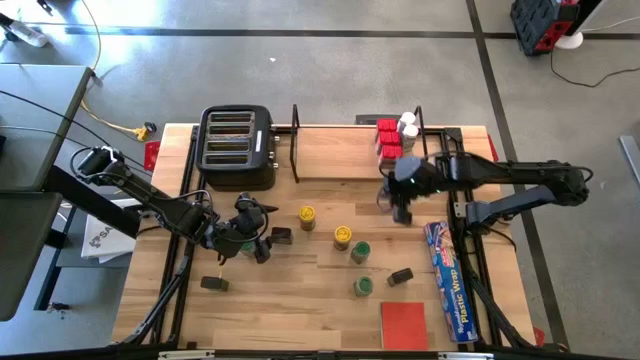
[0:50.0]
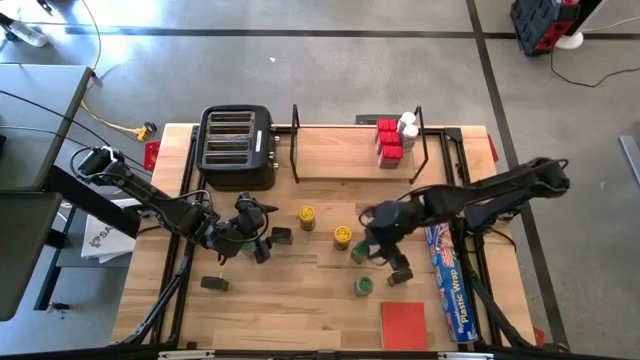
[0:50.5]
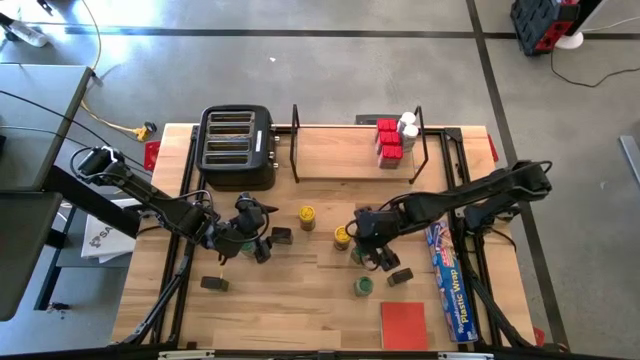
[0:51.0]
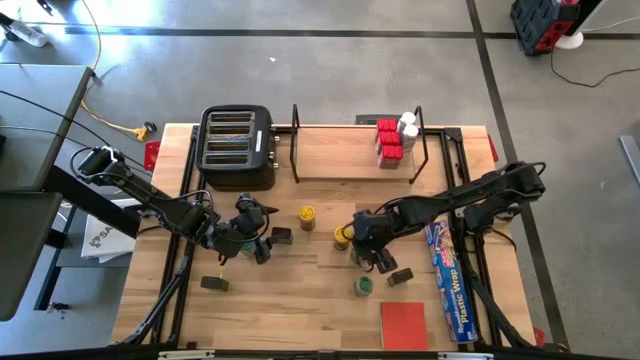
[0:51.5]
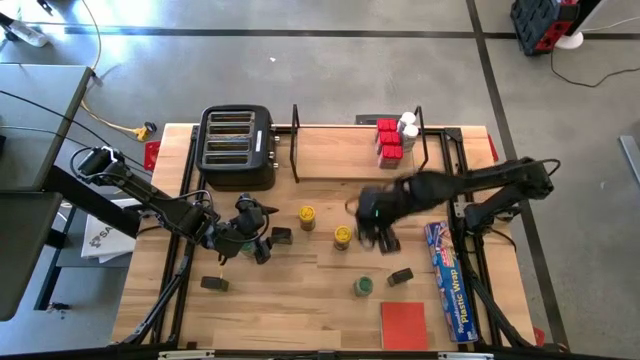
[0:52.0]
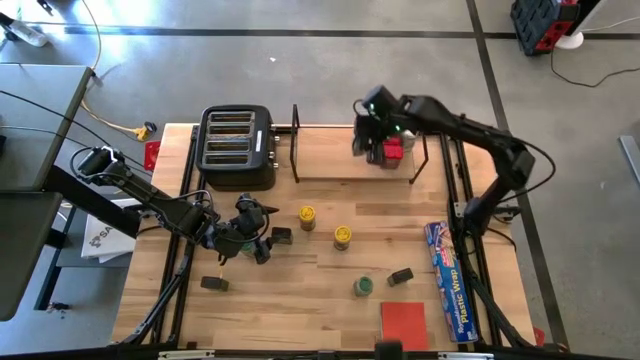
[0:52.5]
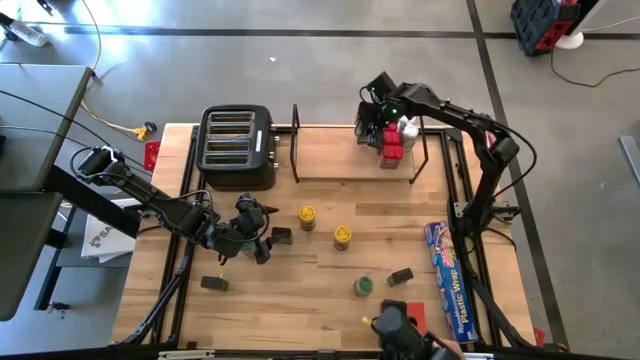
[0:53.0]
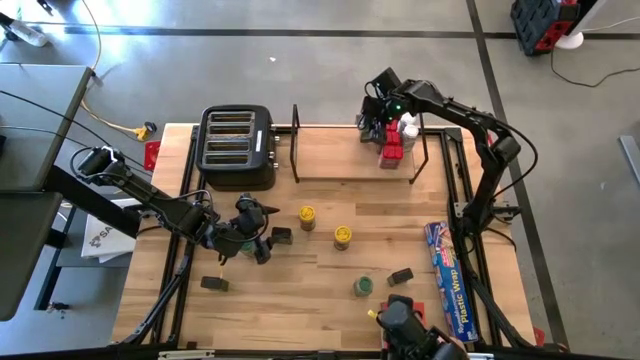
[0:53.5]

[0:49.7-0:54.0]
Task: Shelf spices
Put the top right green seasoning bottle on the shelf

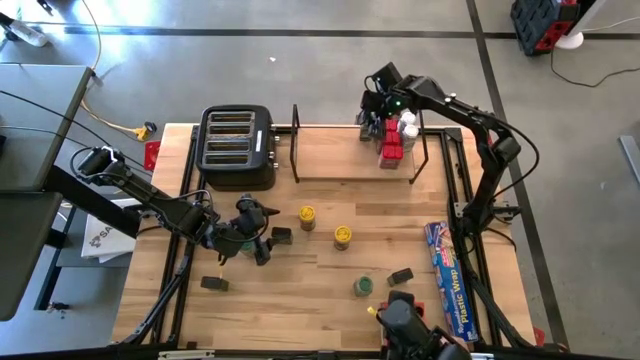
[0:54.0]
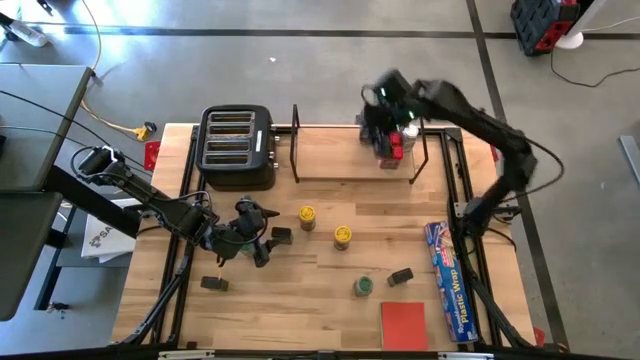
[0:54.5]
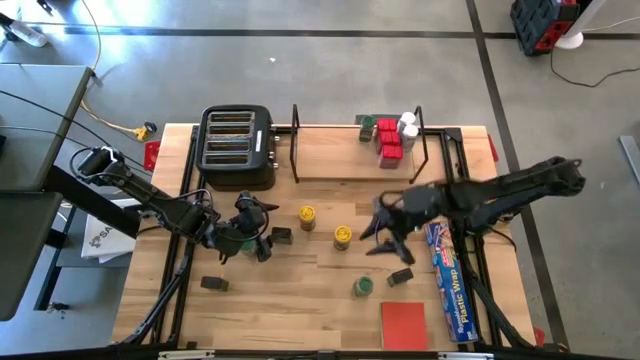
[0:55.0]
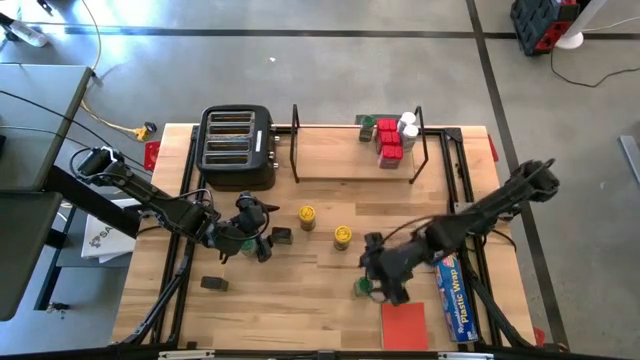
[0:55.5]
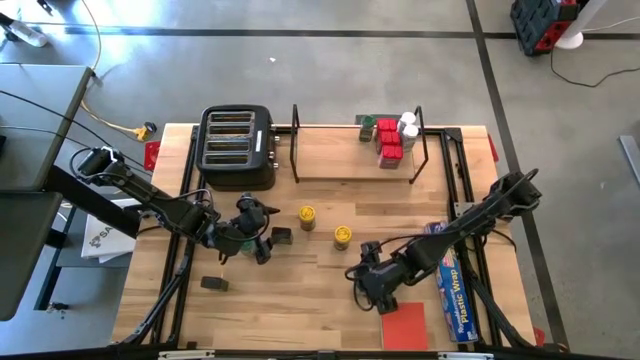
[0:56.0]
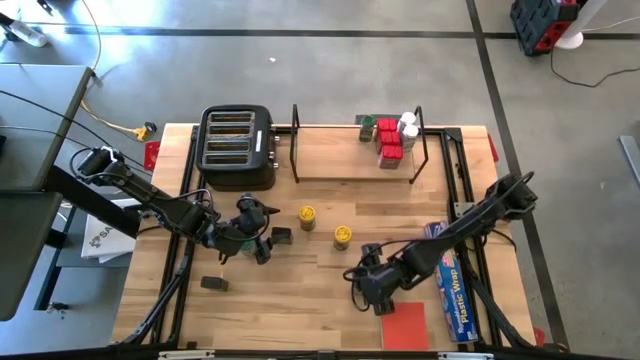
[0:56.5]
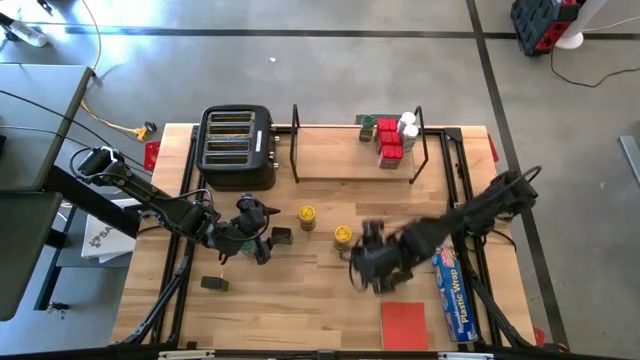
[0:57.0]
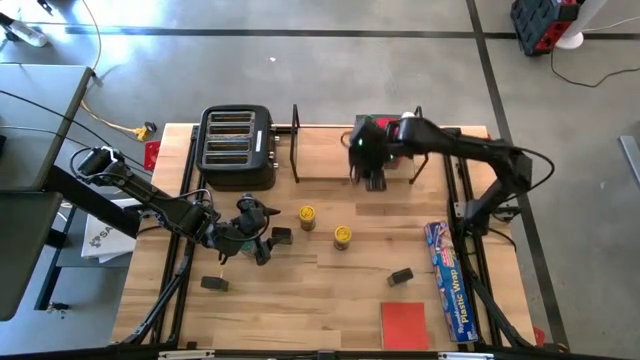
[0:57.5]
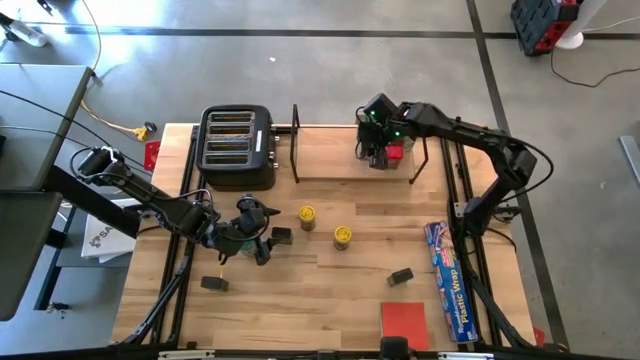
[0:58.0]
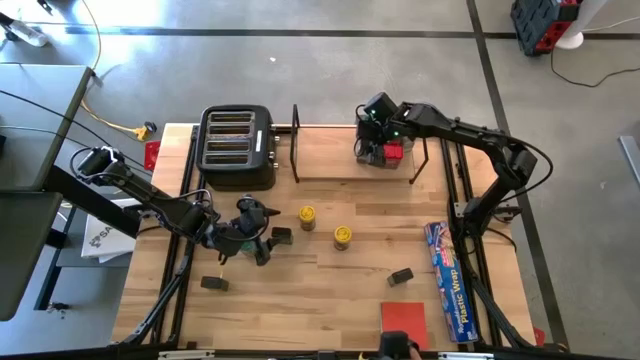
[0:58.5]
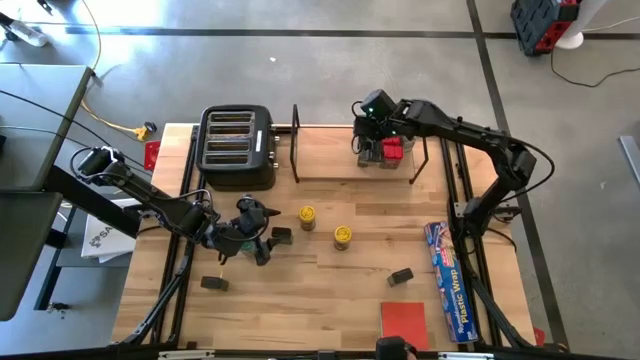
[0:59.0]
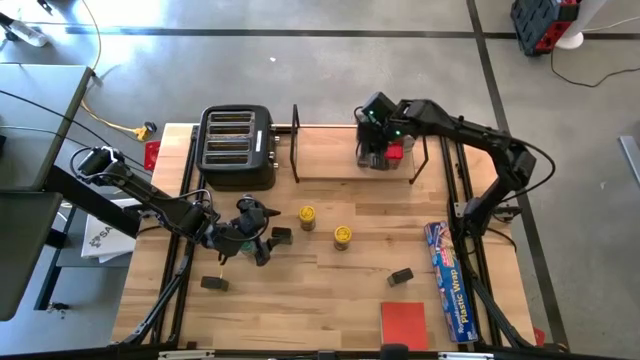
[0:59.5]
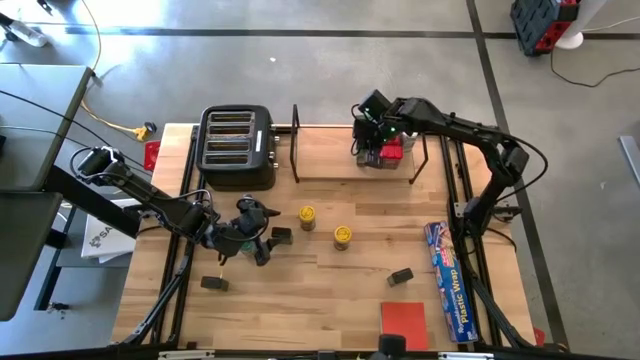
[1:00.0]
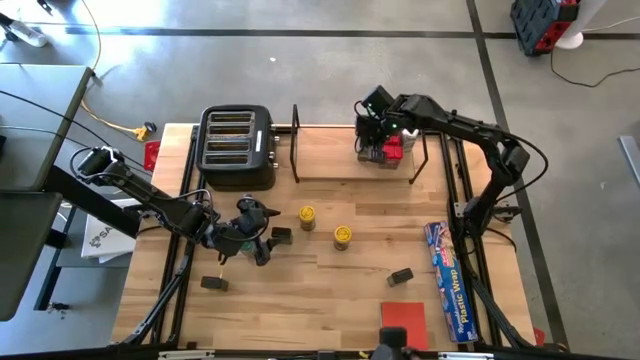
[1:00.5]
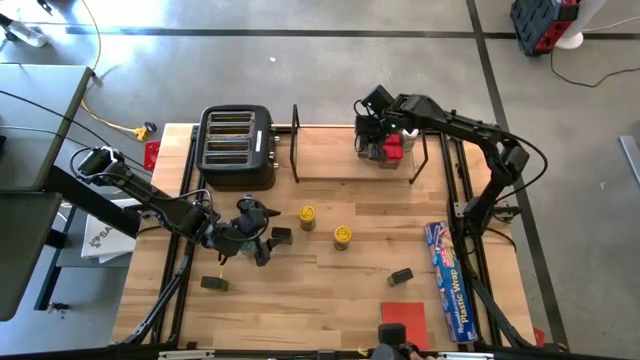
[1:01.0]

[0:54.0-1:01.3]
Put the right green seasoning bottle on the shelf aligned with the other green seasoning bottle

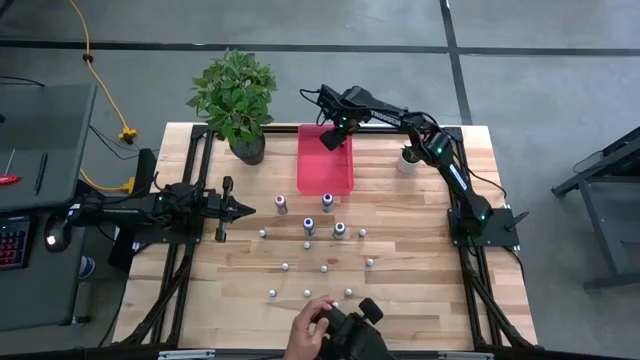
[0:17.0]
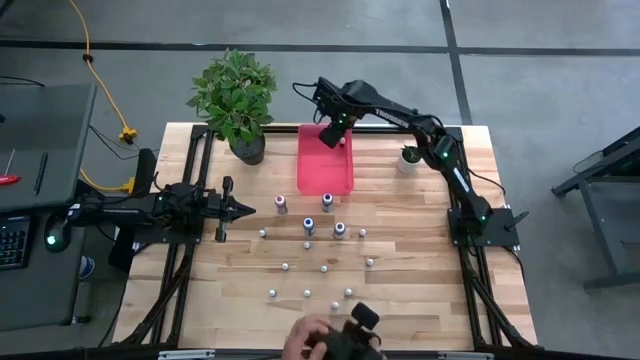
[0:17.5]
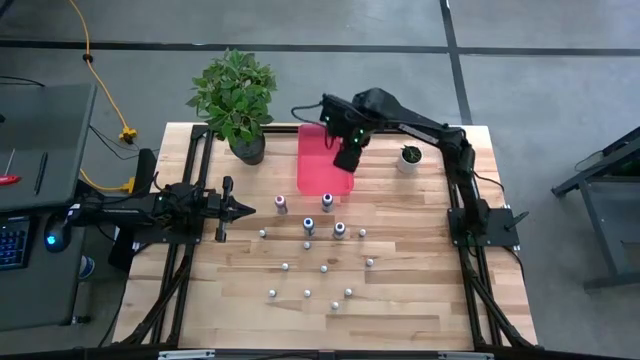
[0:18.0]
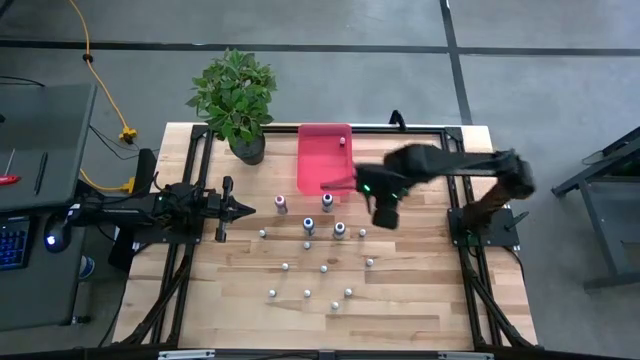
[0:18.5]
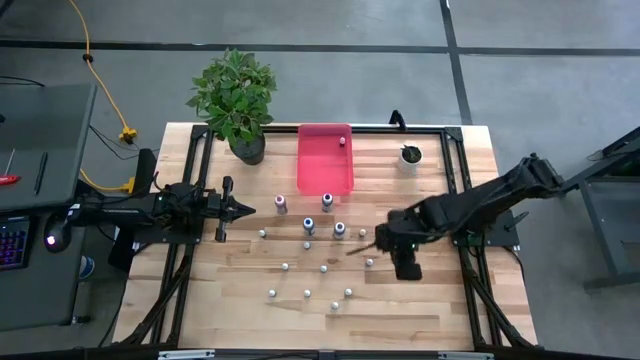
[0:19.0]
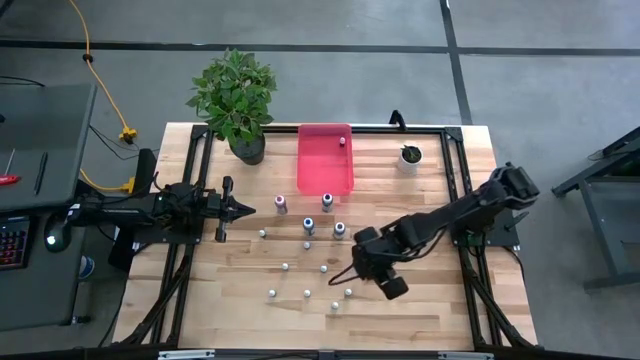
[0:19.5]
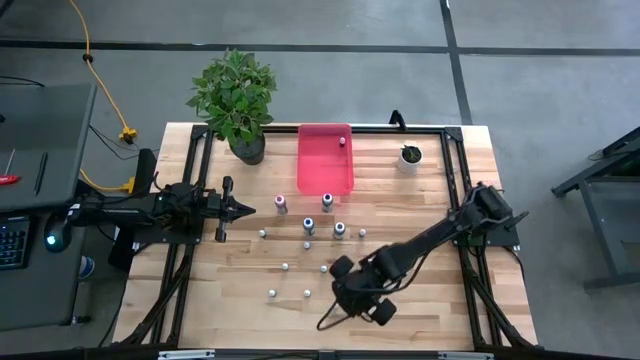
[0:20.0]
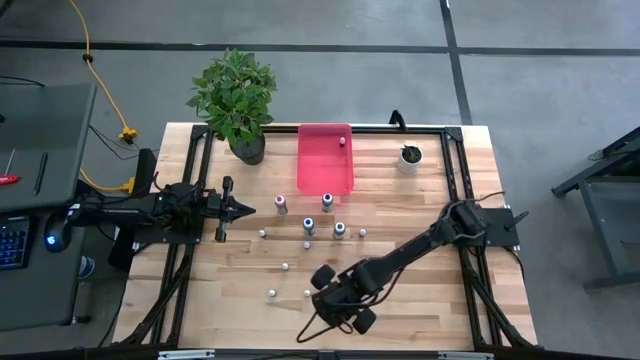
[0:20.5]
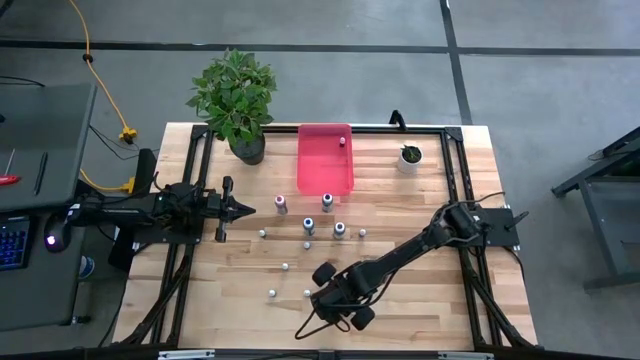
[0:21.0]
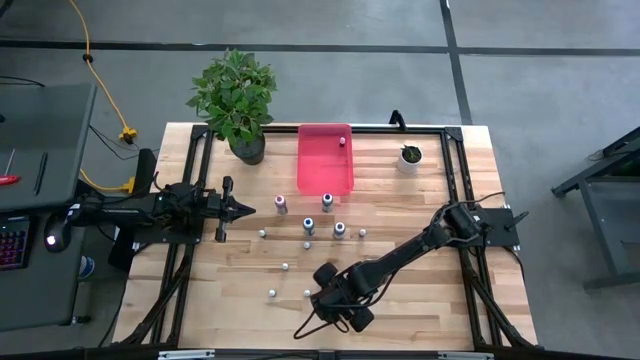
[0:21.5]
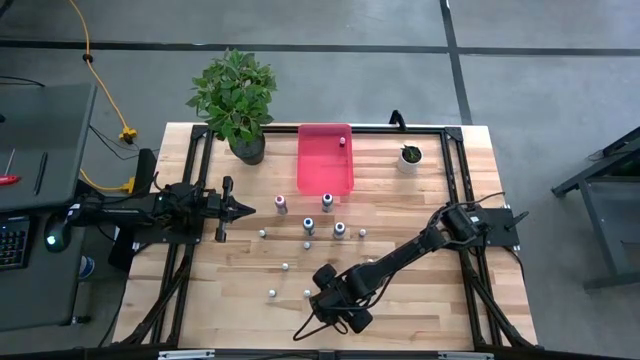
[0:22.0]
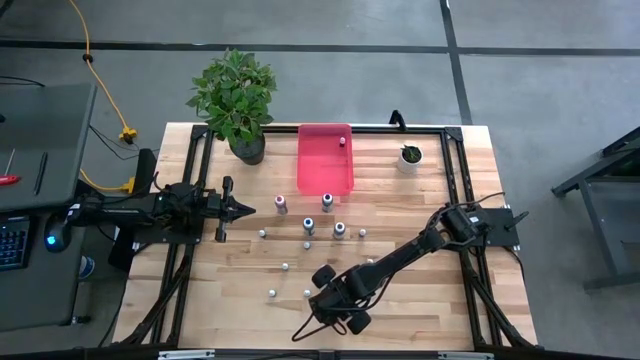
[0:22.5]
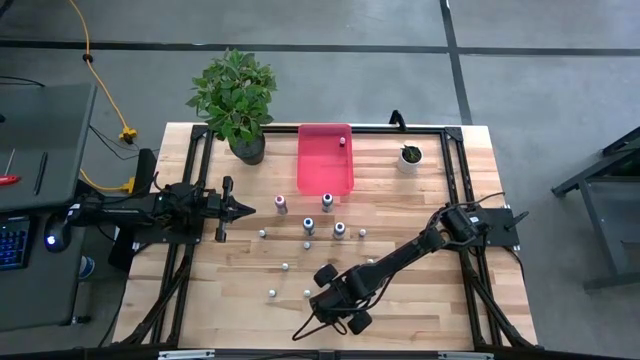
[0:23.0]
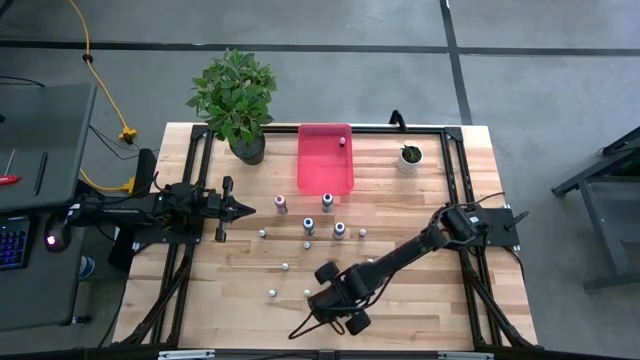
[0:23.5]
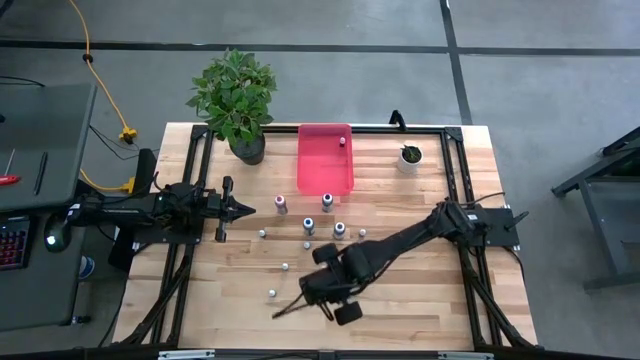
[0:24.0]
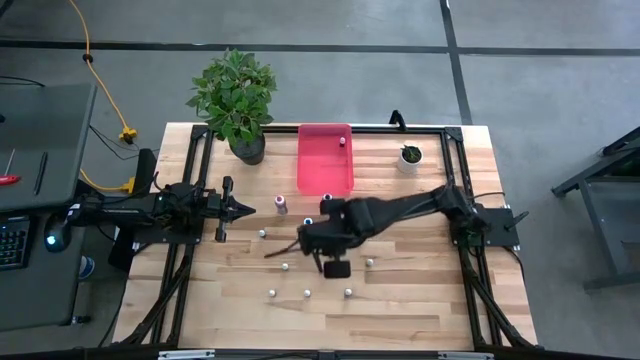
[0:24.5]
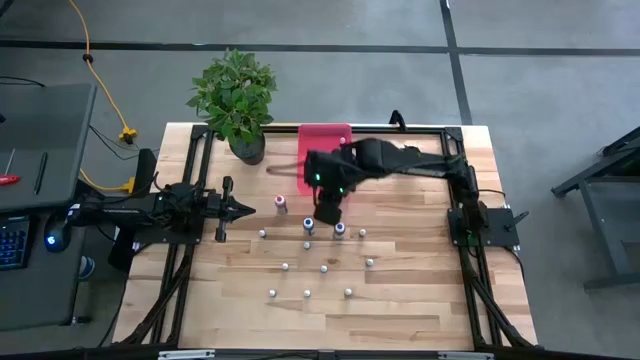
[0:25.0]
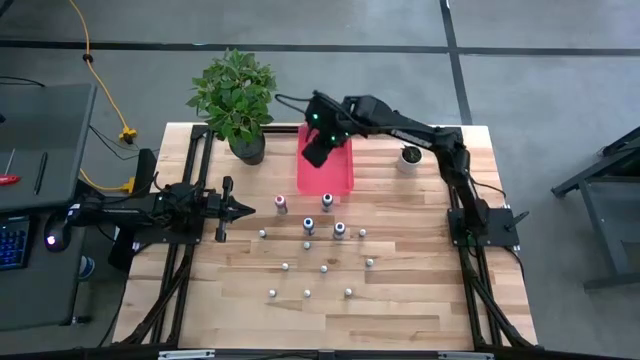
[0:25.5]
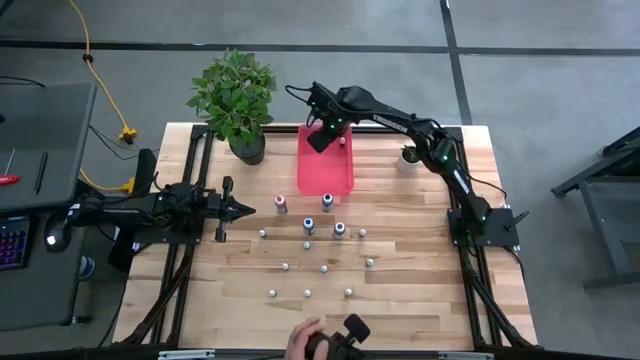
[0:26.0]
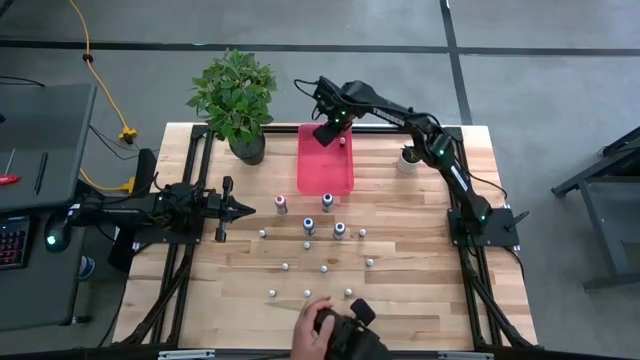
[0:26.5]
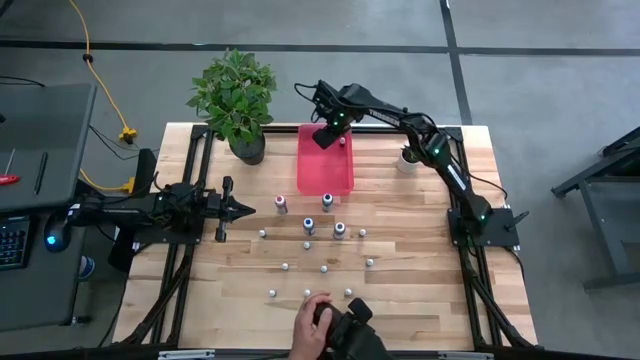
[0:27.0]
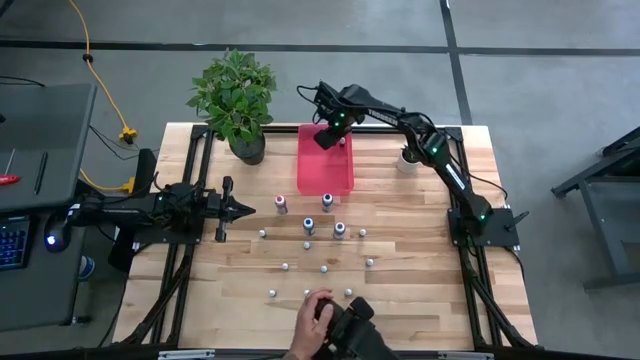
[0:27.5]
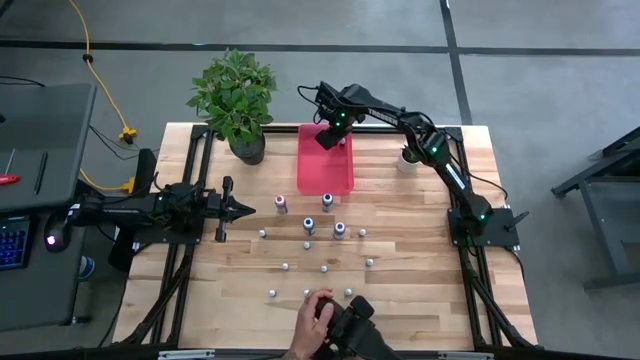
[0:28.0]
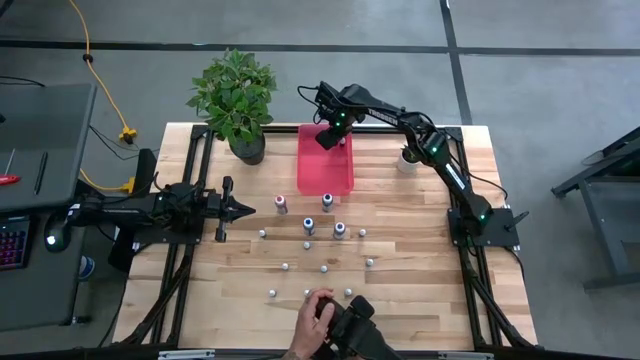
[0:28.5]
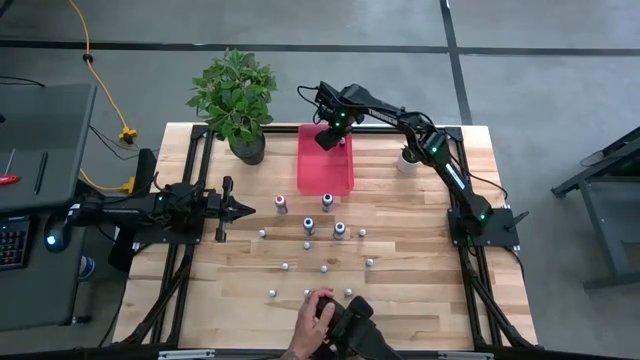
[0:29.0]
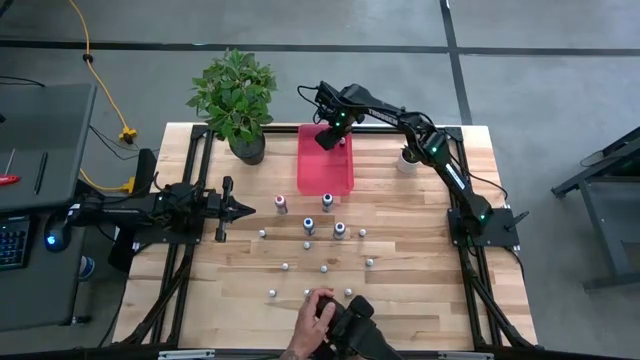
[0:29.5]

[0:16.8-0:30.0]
Task: Pick & Place food coloring
Put the purple food coloring bottle into the pink bin
